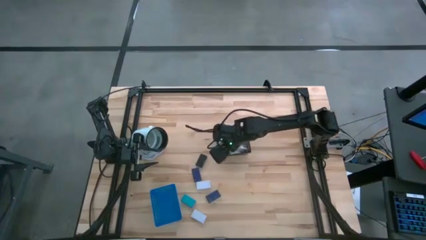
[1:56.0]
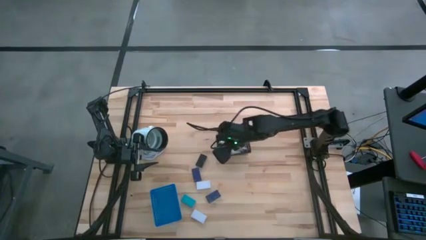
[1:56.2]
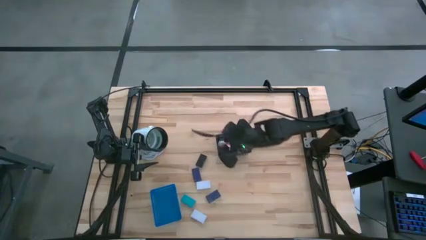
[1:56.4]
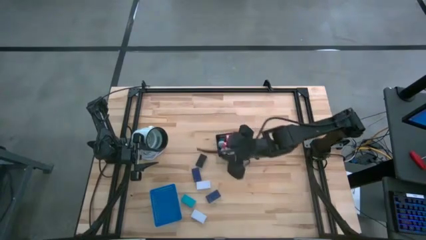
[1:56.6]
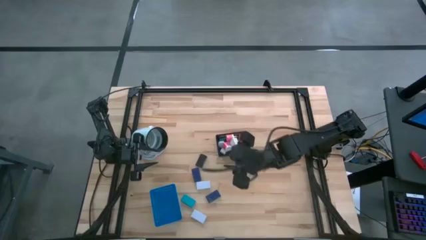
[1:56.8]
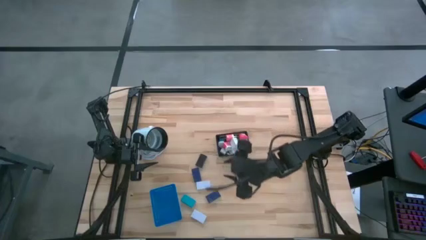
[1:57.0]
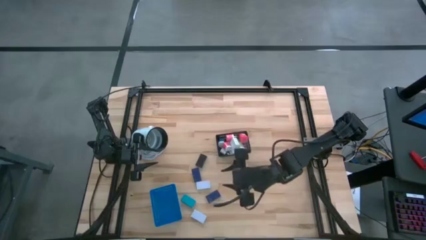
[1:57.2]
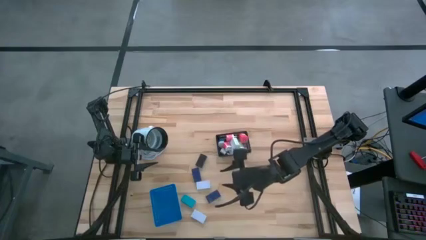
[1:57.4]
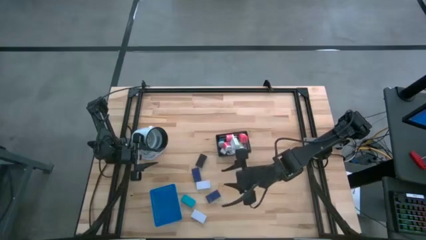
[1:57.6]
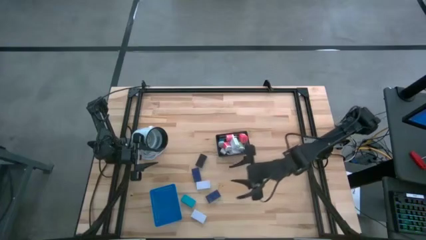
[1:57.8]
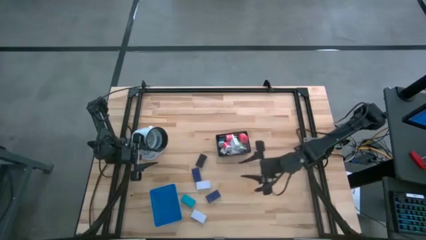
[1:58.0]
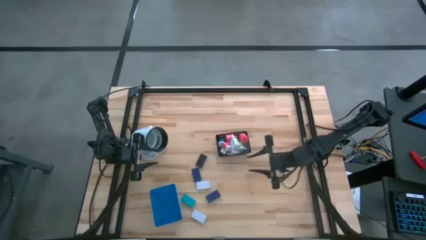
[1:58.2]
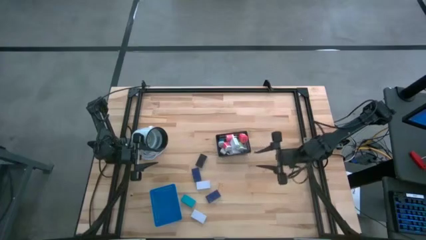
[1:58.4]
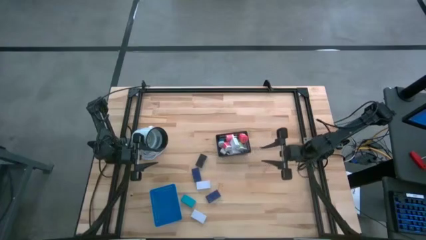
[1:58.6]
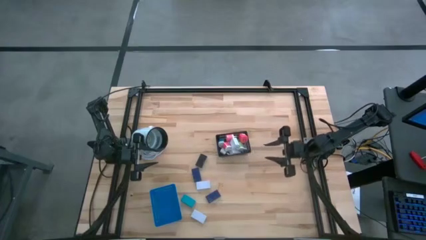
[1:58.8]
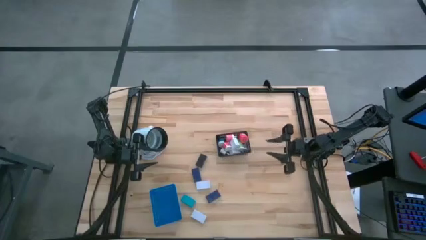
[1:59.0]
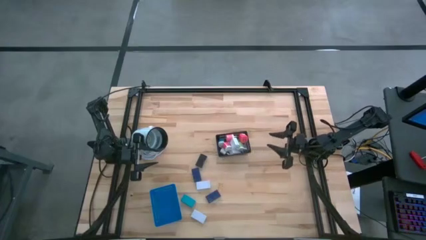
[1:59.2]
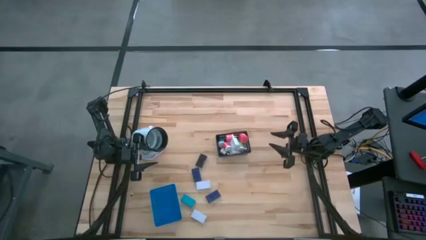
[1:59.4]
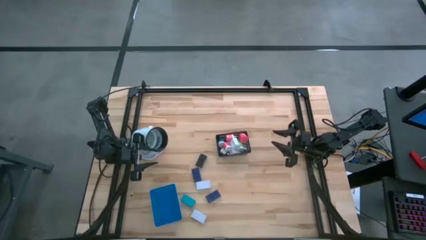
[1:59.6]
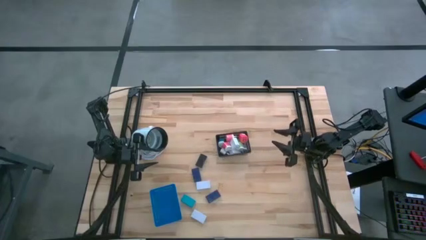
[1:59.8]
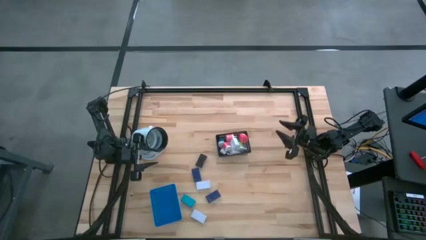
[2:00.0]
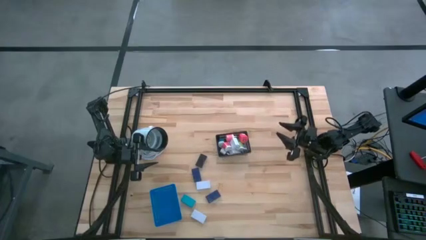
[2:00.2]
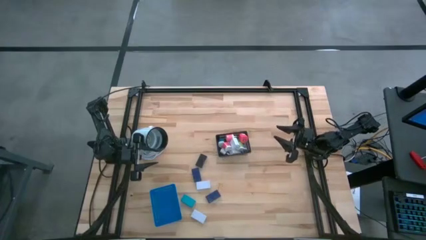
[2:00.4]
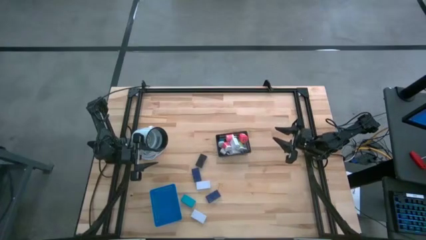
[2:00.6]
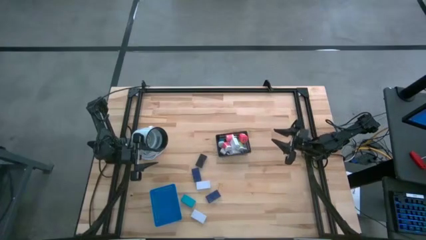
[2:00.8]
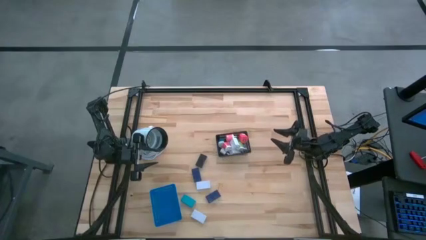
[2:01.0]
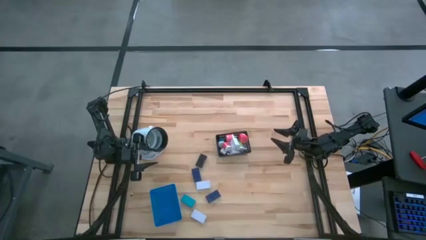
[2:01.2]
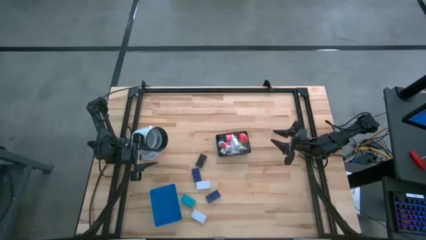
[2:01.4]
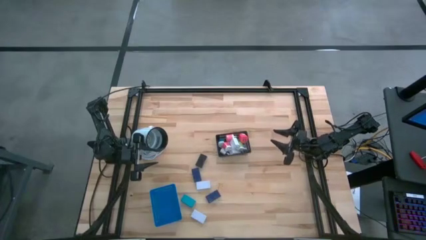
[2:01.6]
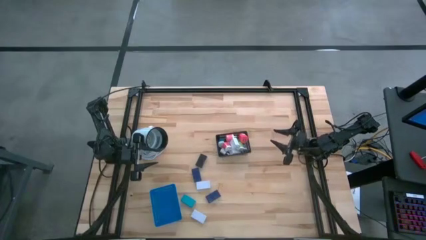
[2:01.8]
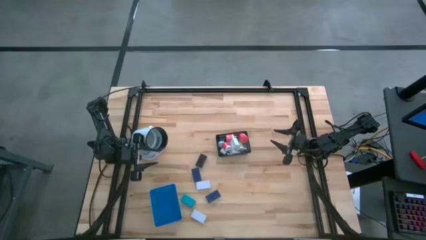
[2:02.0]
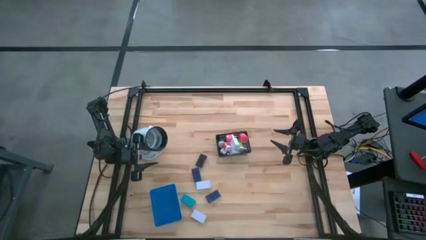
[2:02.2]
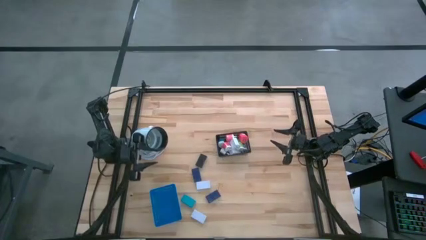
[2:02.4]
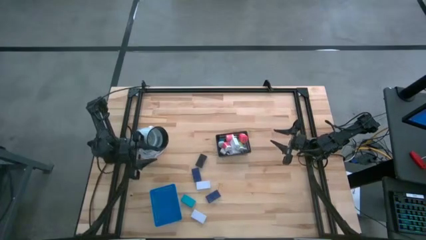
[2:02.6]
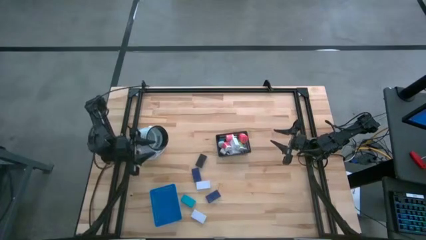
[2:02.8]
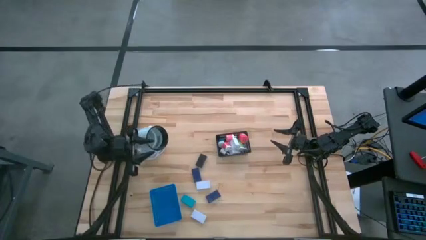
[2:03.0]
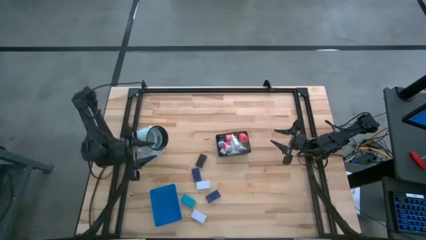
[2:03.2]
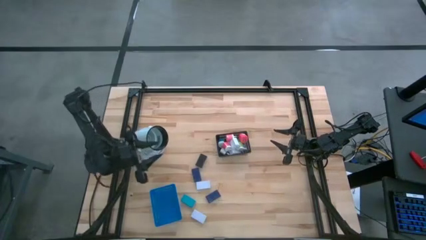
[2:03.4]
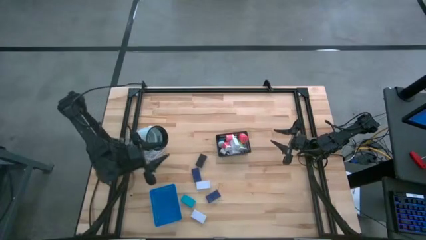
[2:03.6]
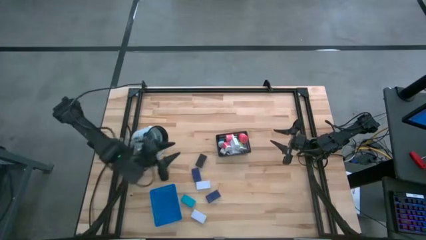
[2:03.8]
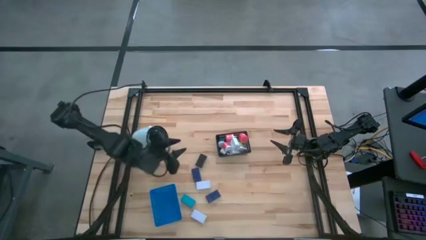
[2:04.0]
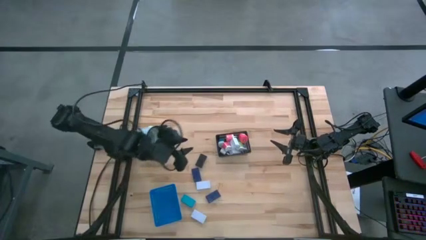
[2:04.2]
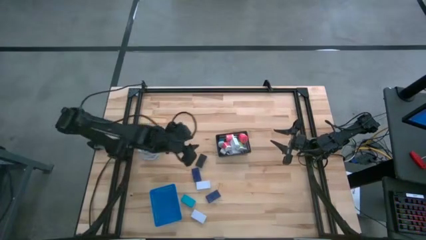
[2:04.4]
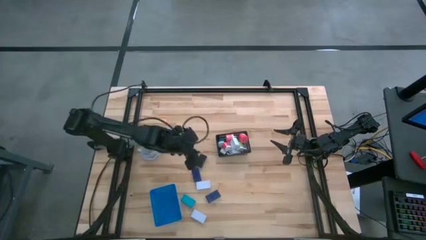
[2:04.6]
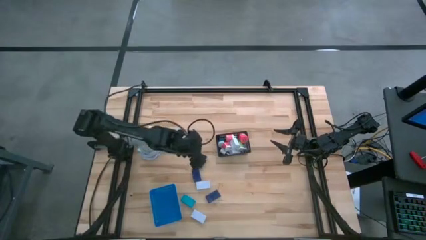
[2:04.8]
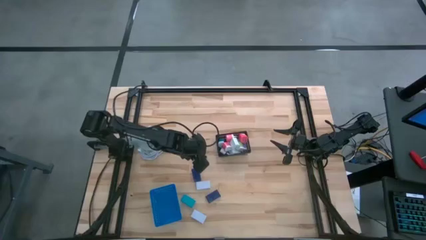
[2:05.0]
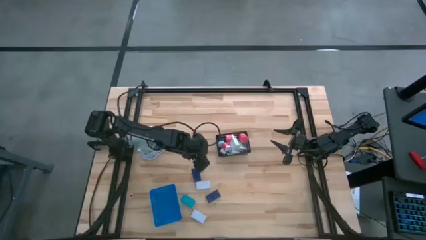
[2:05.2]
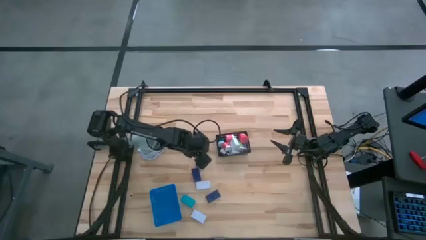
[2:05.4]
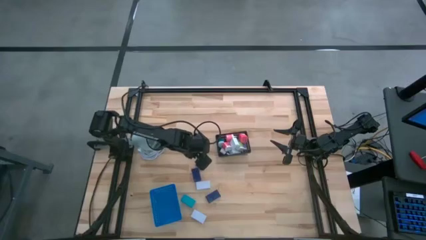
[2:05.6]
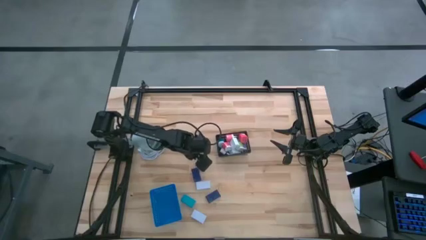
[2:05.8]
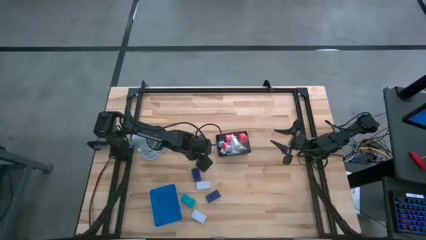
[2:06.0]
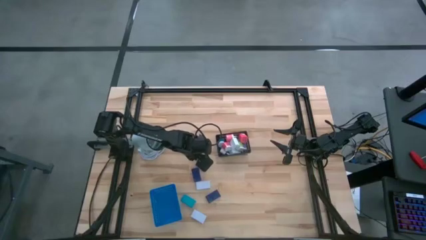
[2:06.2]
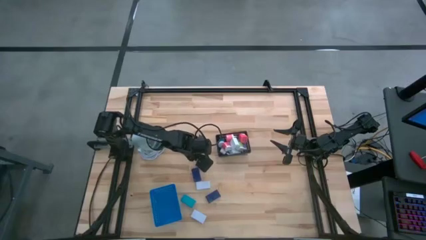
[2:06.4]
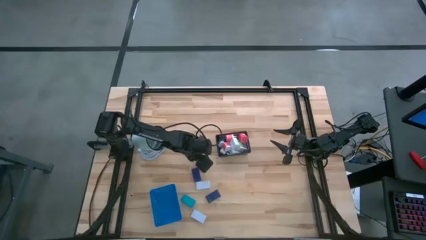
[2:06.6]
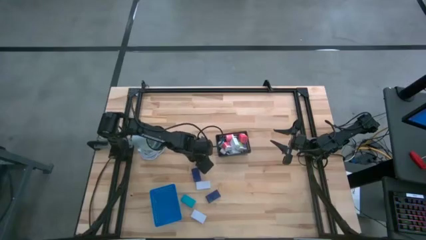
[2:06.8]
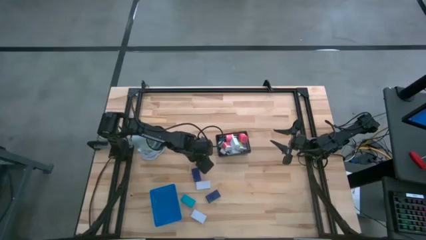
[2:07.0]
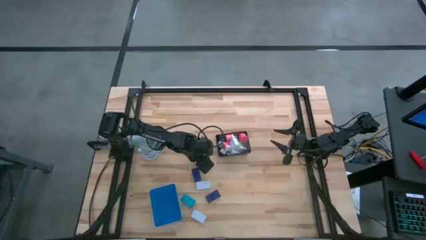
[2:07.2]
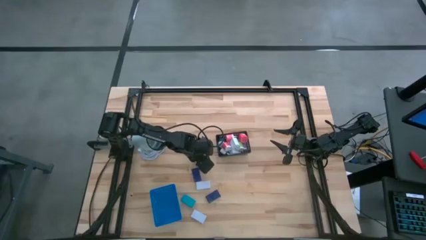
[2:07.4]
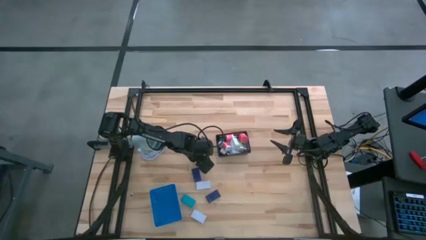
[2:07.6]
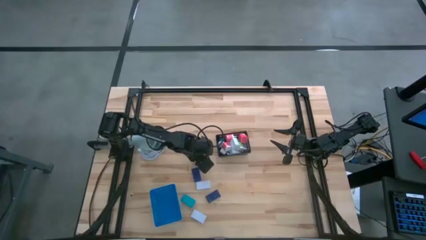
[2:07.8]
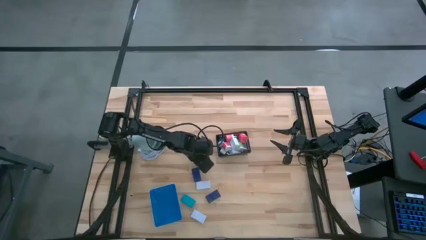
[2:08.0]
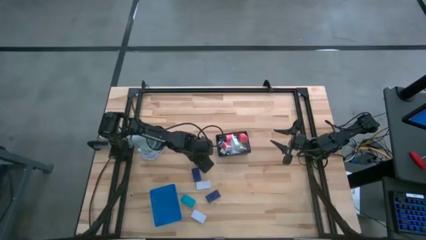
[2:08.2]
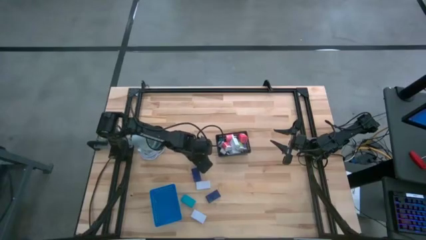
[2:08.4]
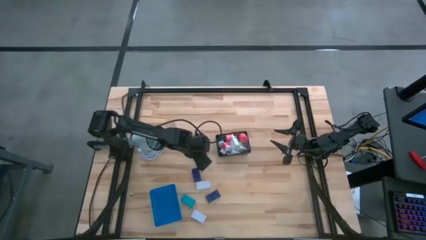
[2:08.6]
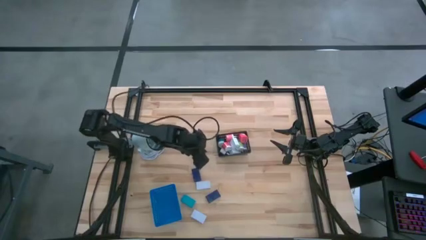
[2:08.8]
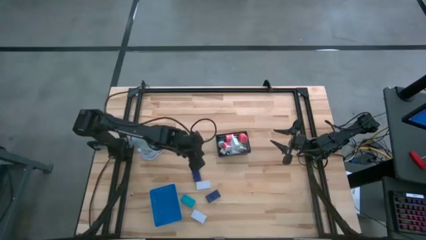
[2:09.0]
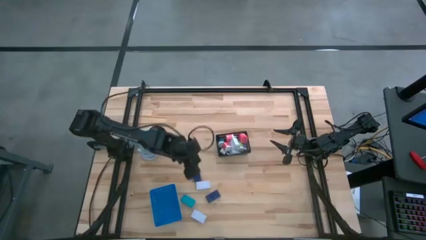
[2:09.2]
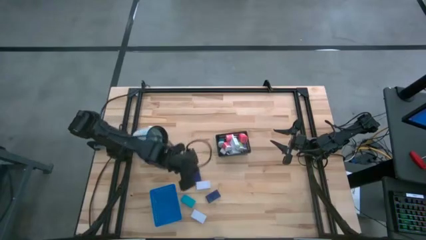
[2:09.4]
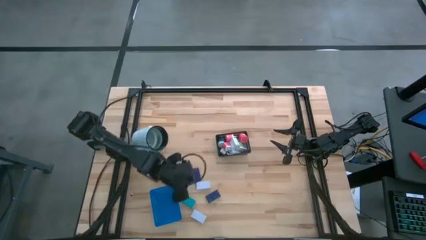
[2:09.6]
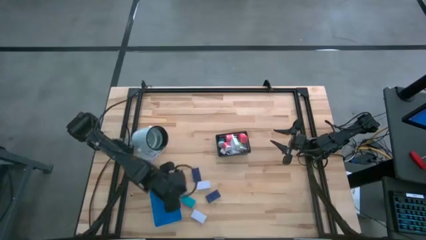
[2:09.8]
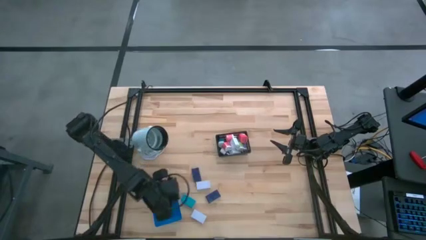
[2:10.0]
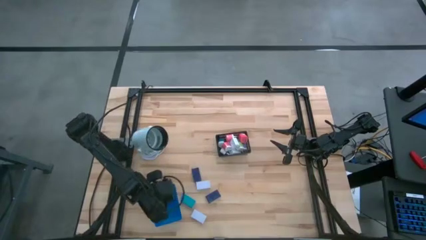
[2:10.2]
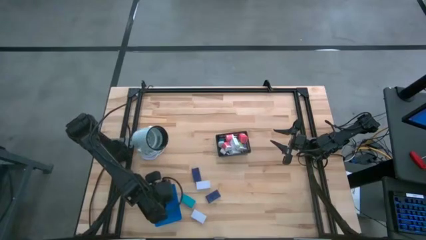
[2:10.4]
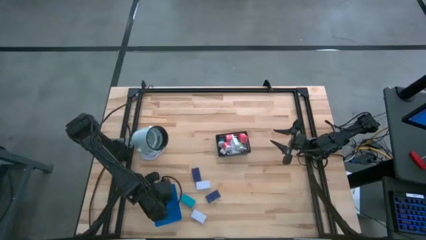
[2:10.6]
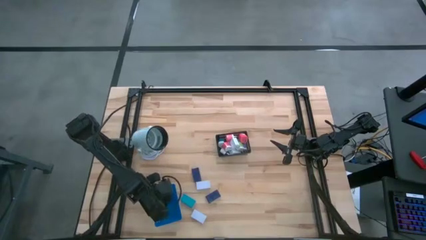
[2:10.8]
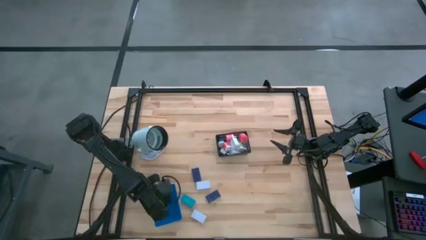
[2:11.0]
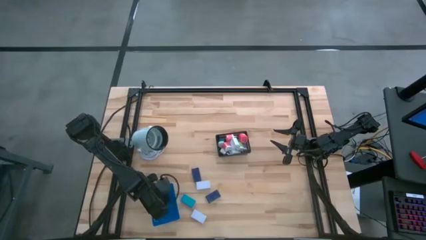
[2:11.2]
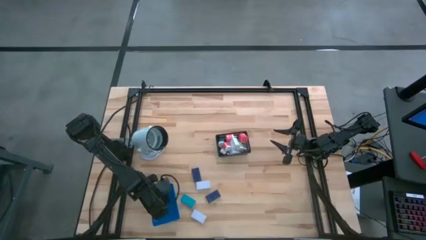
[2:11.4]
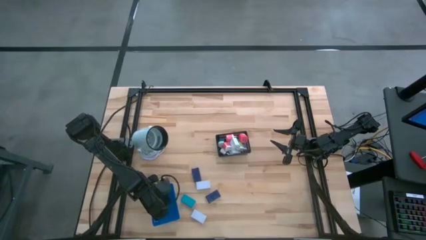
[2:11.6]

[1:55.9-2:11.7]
Task: Pick & Place Office items
Put the black digital timer into the blue bin
